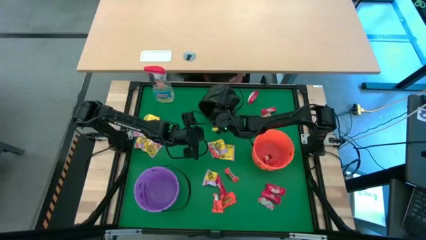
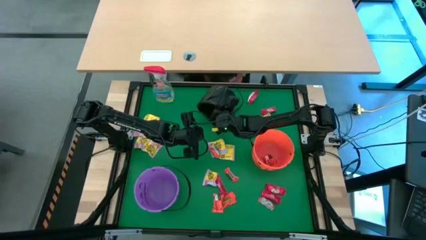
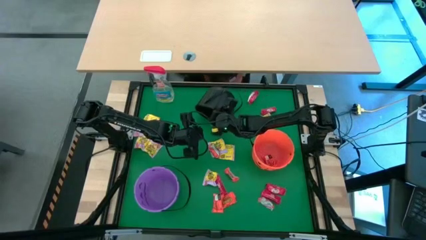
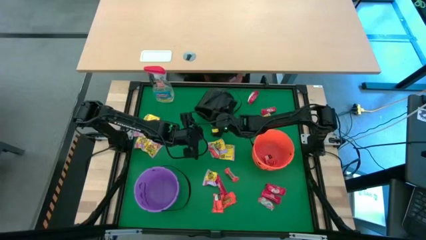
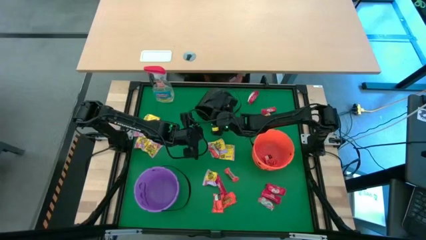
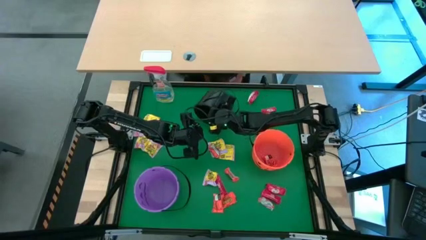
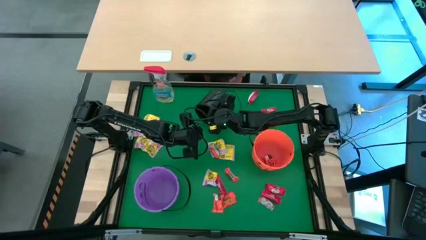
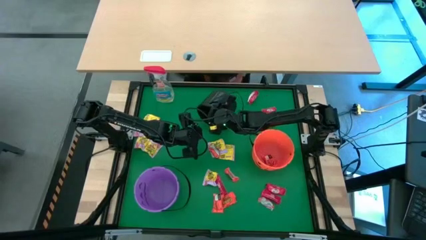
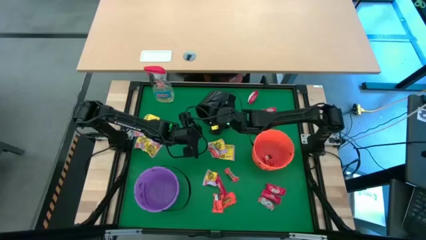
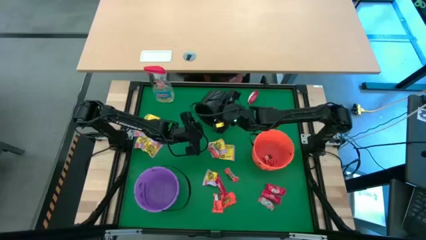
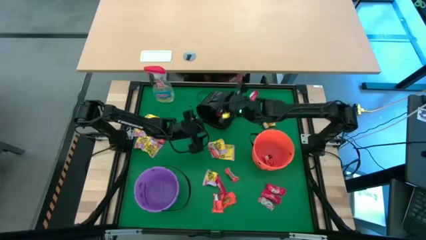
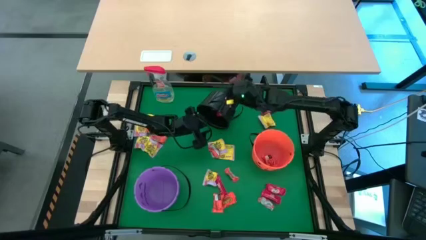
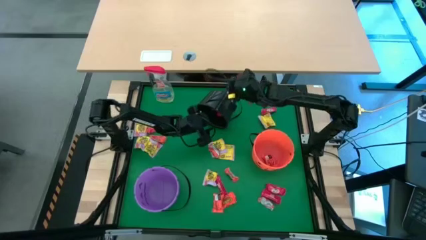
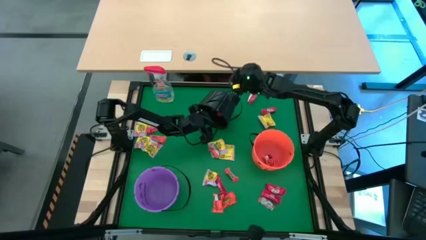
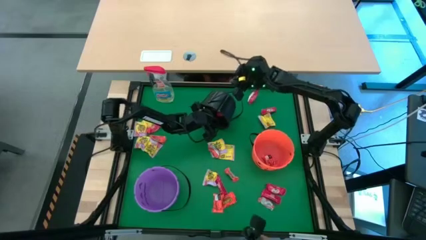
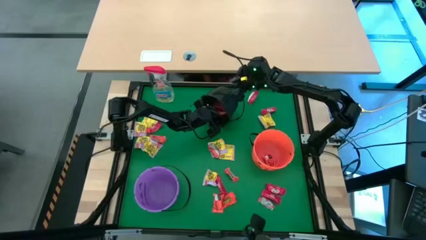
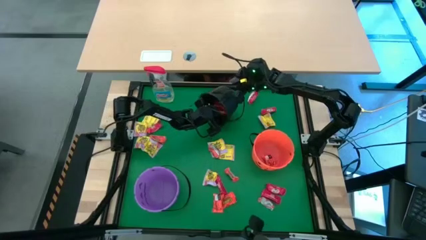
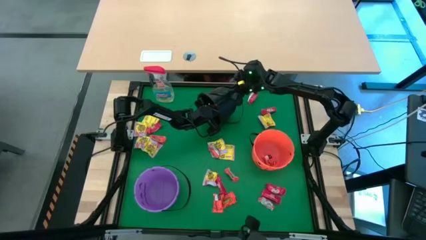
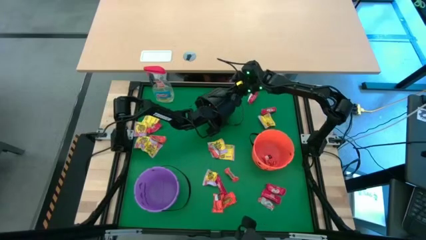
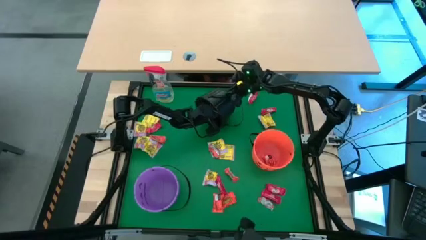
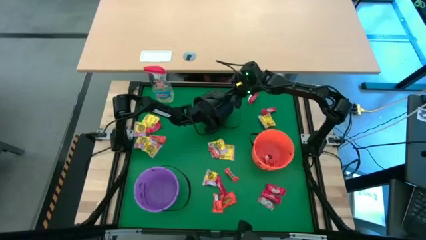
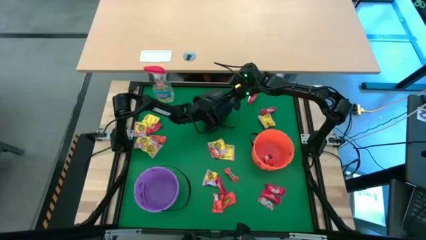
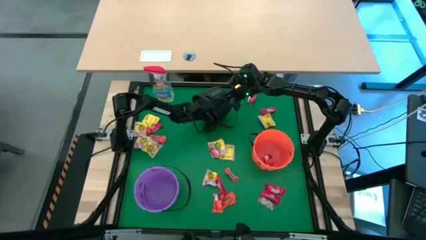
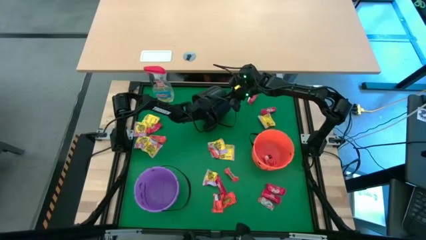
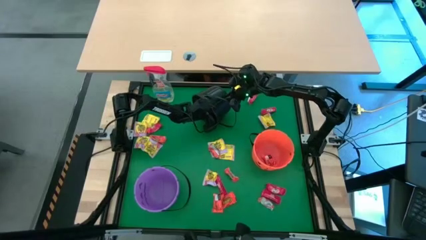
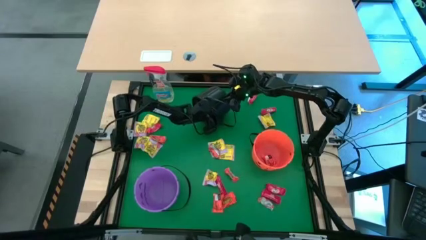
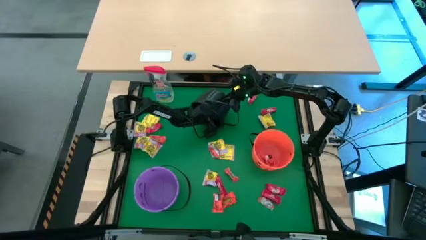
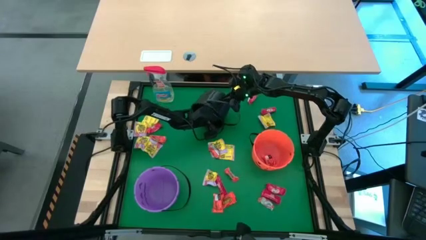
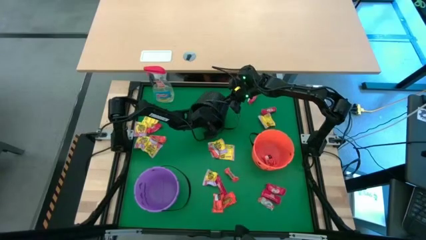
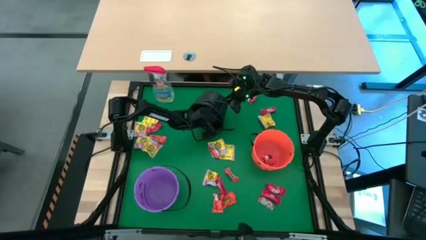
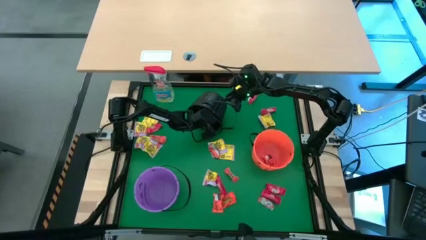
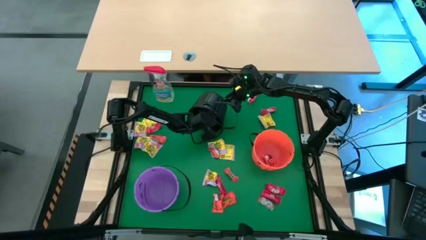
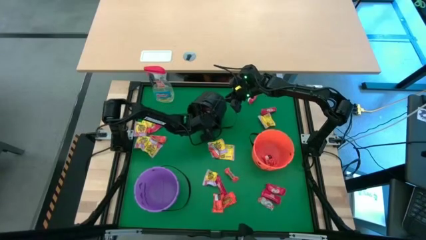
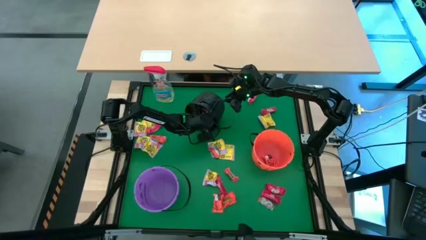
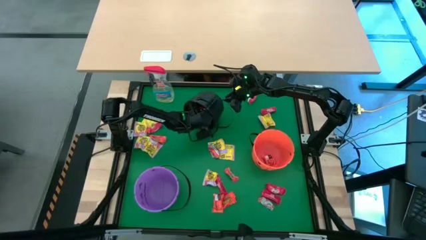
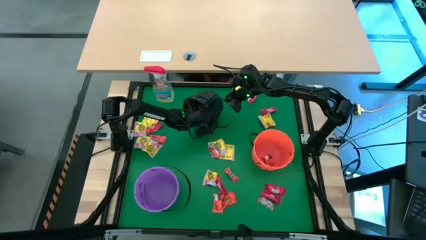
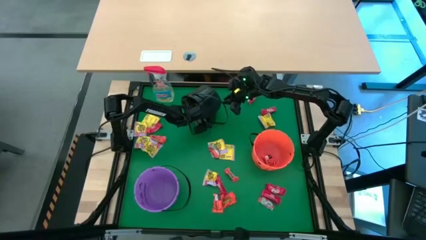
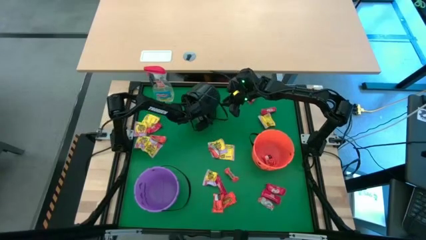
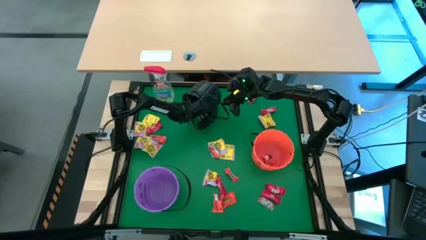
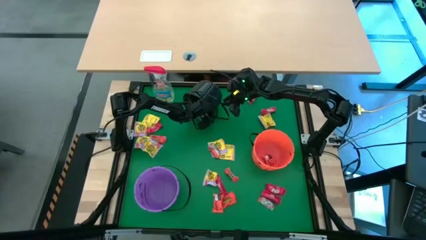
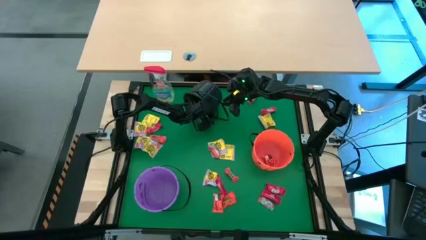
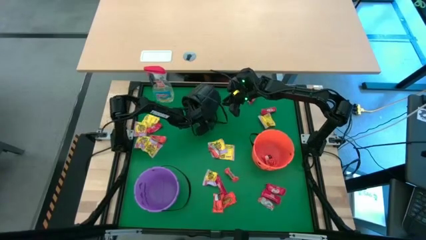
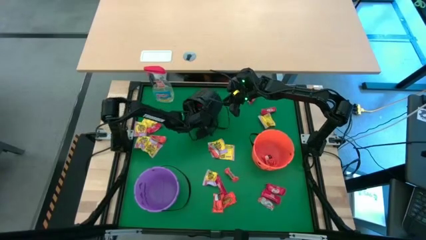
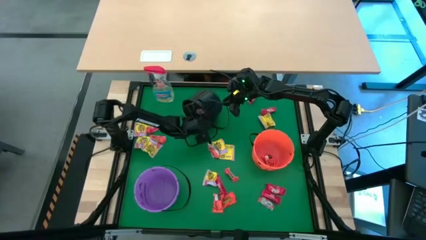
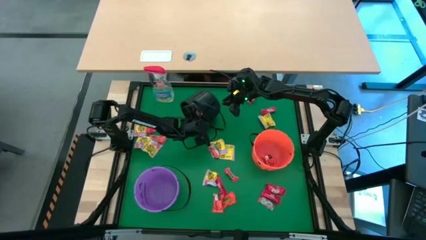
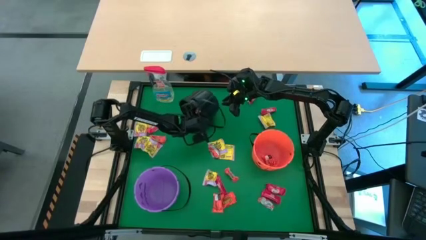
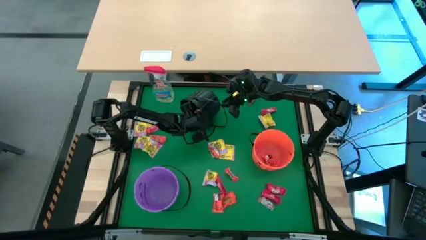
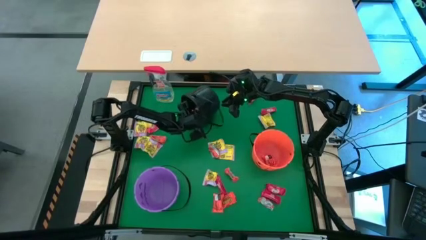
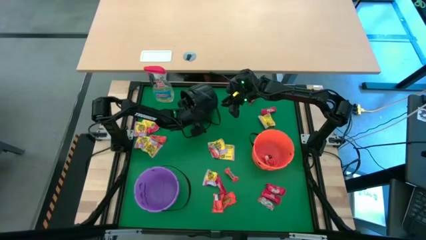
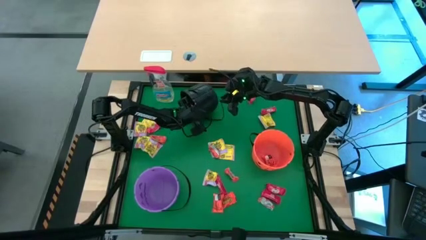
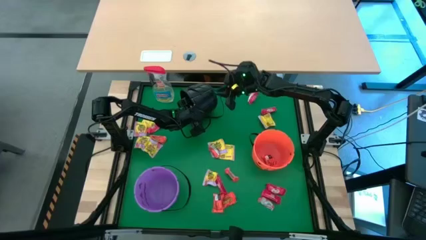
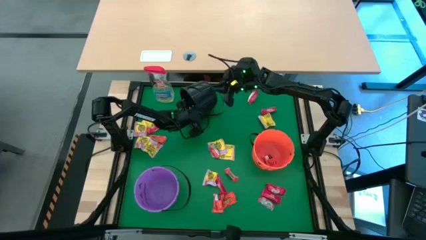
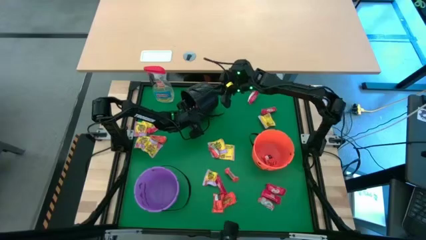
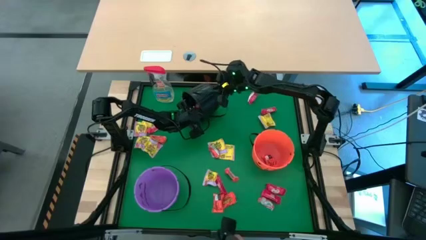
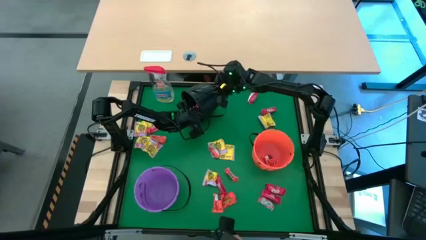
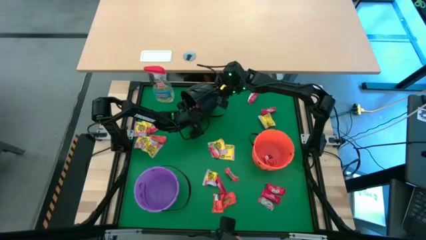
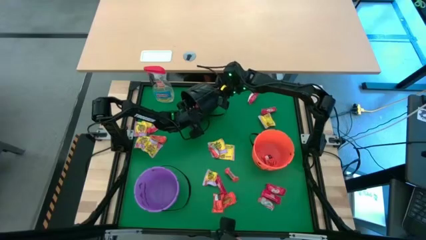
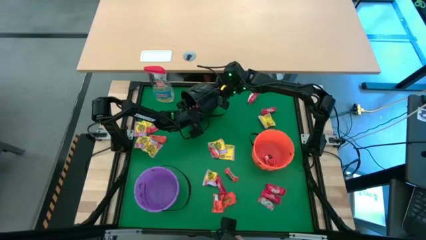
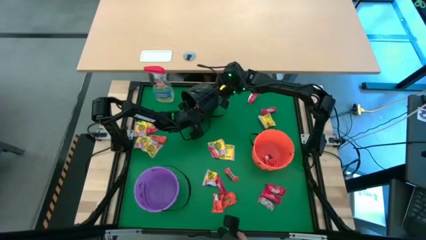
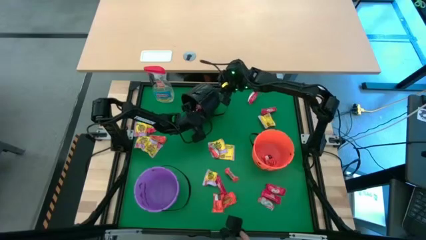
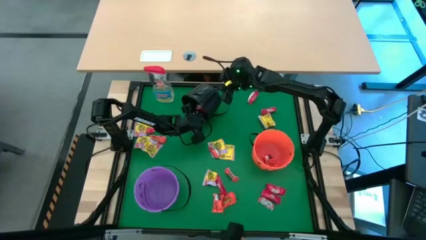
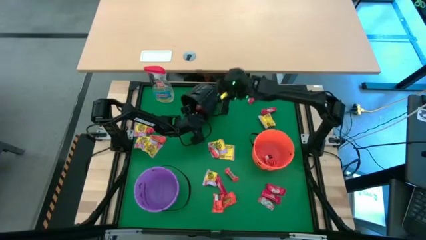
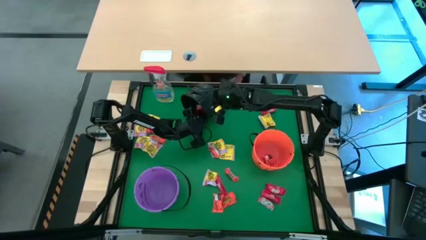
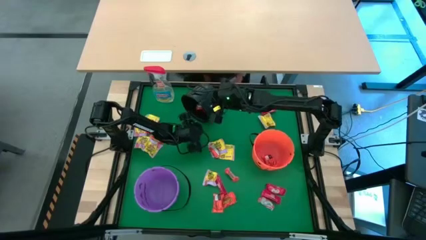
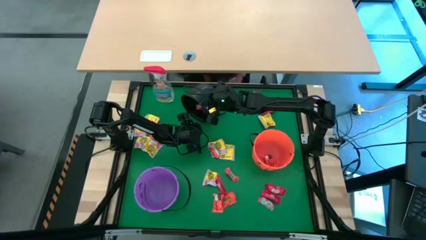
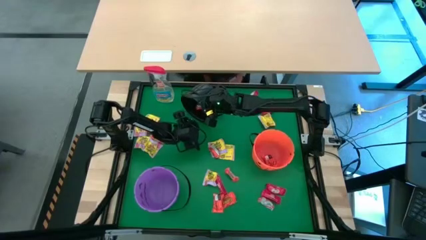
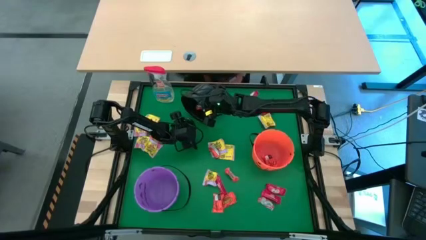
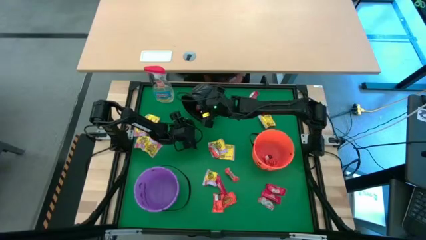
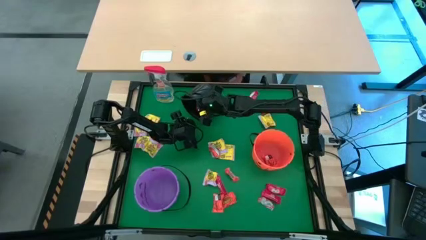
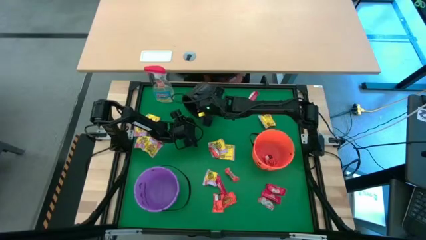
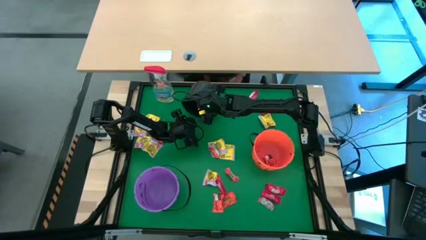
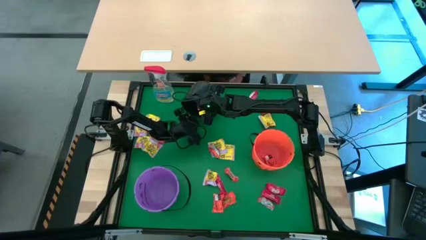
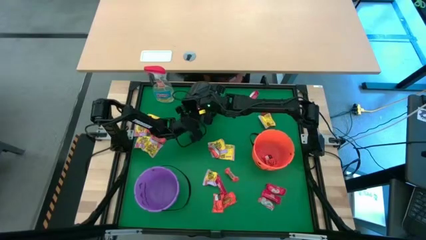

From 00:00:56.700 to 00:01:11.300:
Task: Sort candy
Remove the orange candy from the black bucket

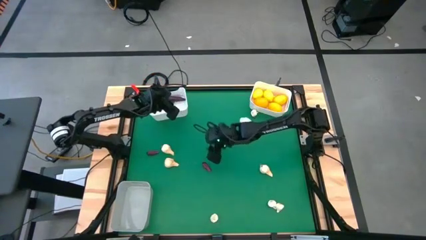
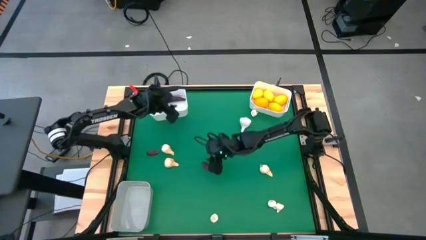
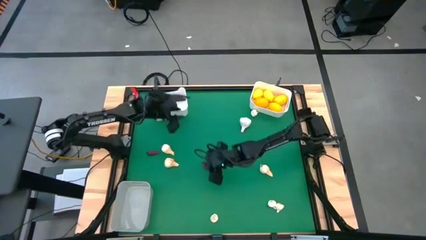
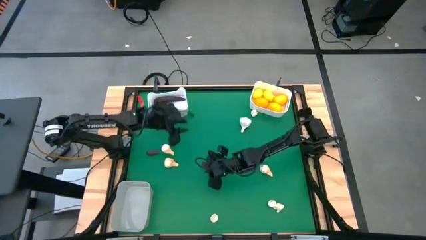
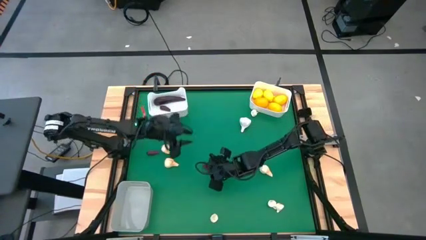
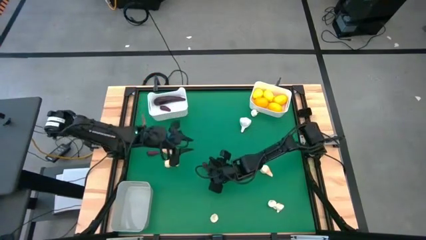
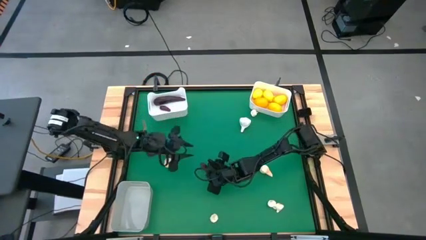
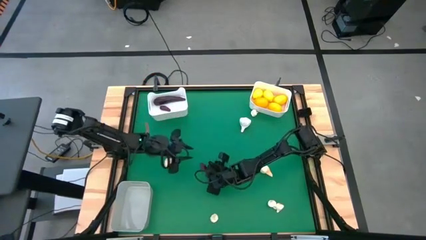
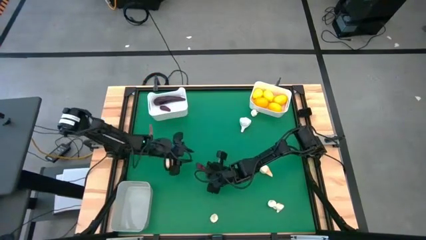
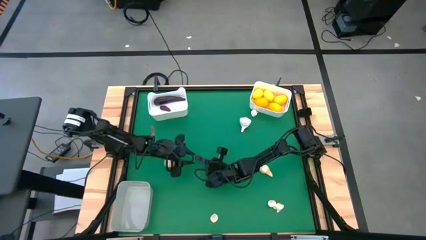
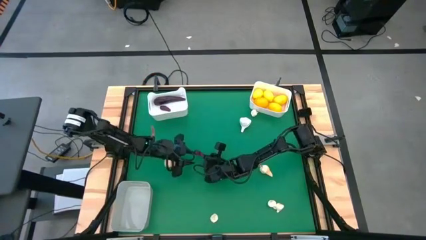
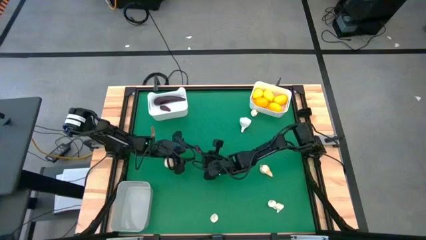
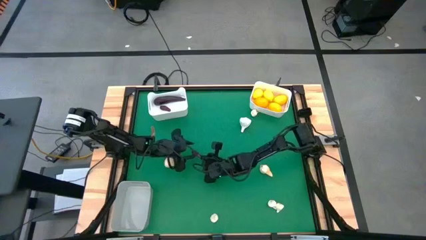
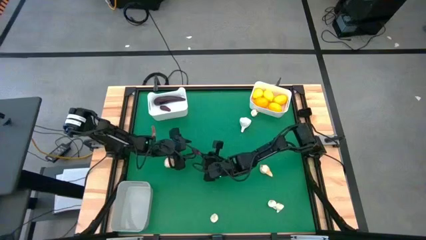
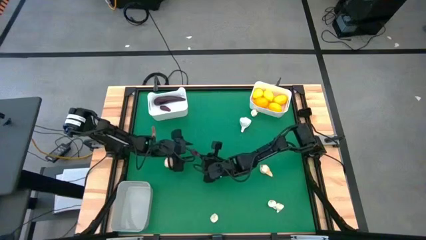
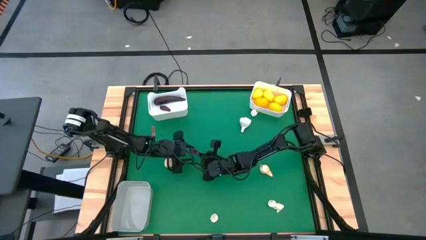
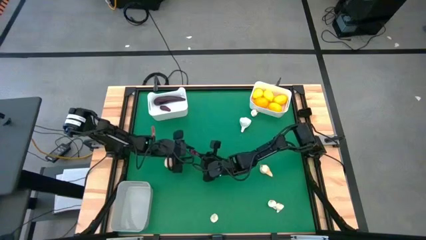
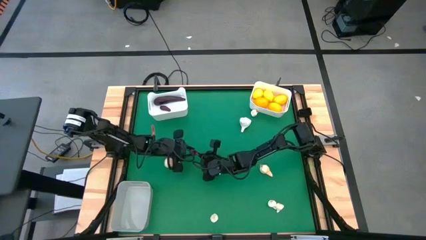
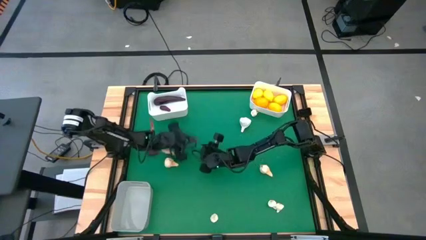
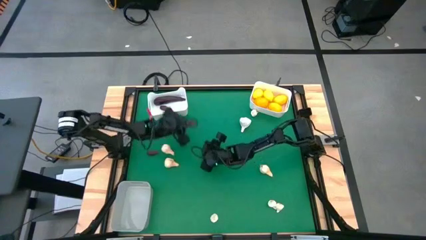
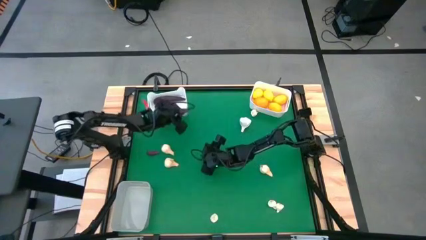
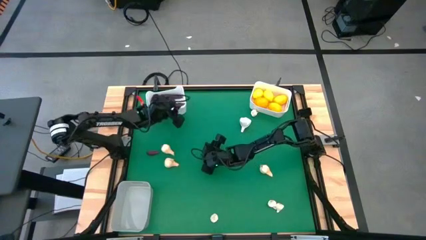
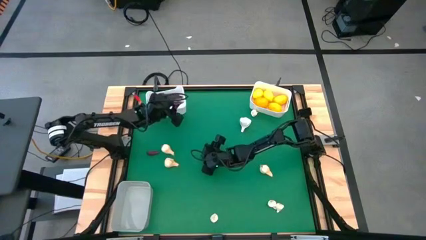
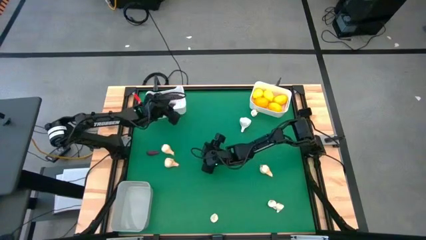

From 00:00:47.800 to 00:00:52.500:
Task: Sort produce into baskets
Put the right violet eggplant into the left white bin
